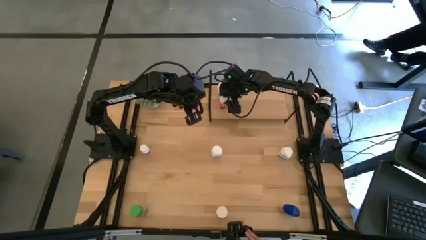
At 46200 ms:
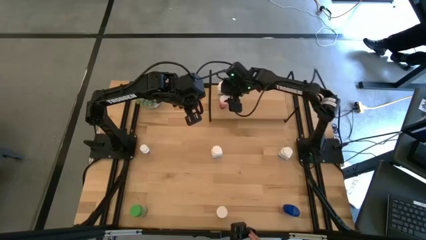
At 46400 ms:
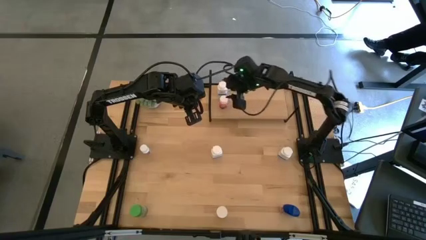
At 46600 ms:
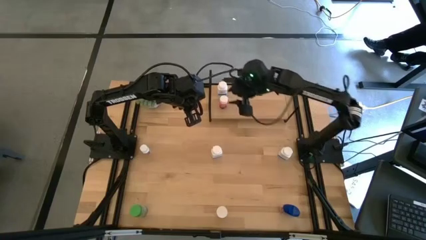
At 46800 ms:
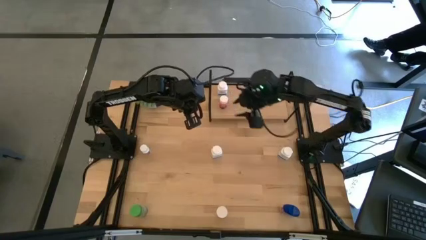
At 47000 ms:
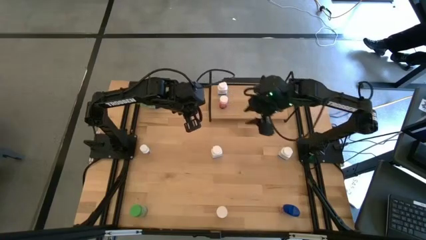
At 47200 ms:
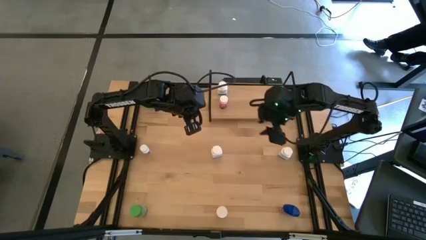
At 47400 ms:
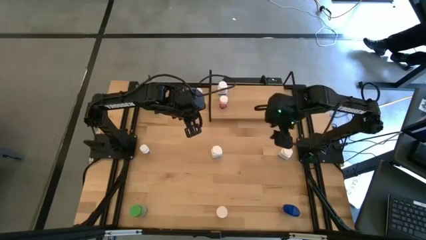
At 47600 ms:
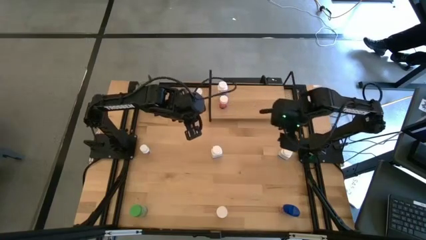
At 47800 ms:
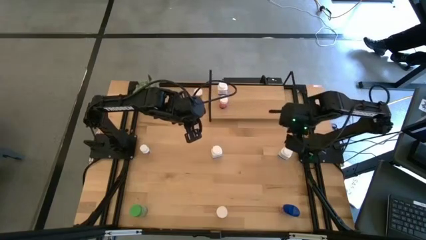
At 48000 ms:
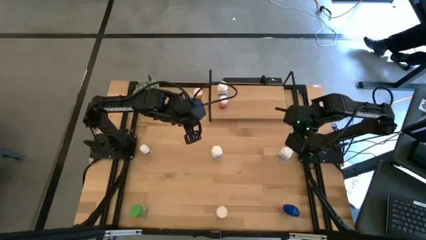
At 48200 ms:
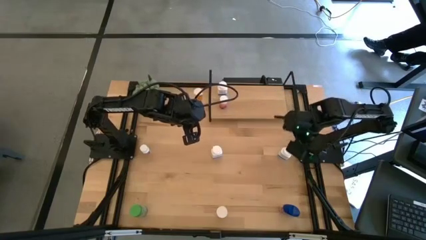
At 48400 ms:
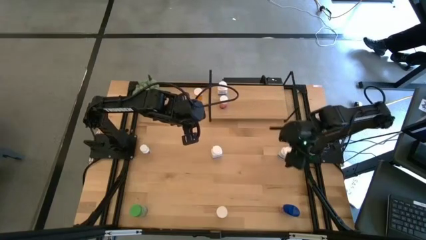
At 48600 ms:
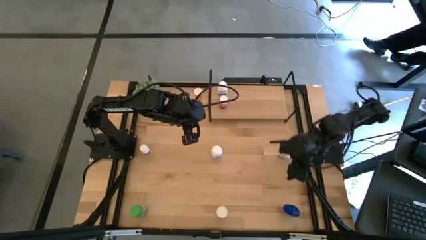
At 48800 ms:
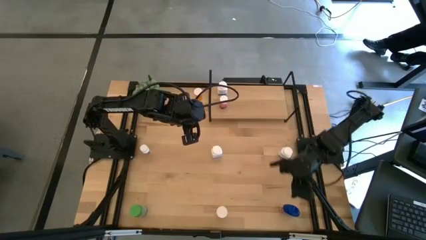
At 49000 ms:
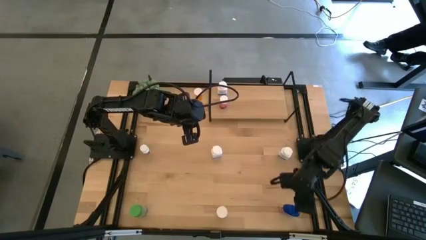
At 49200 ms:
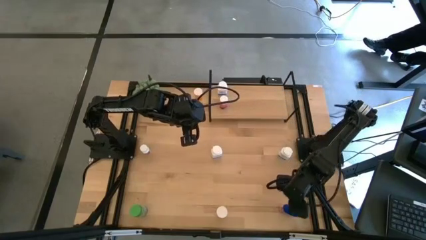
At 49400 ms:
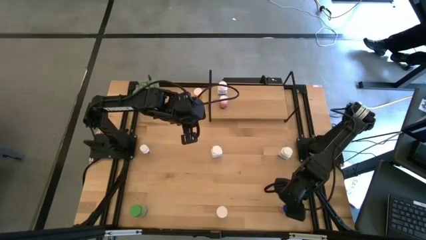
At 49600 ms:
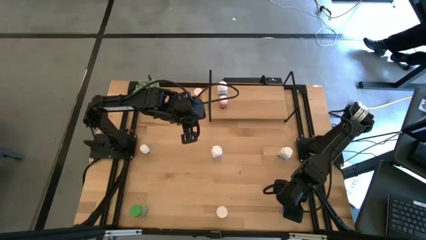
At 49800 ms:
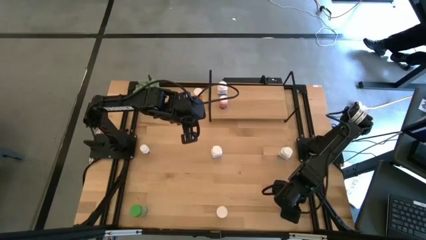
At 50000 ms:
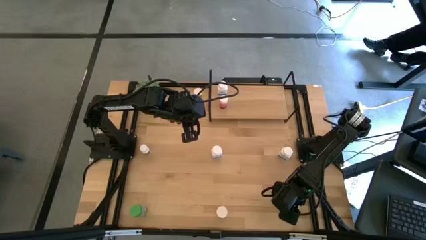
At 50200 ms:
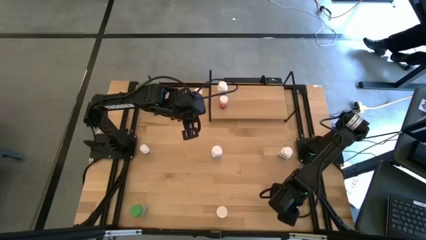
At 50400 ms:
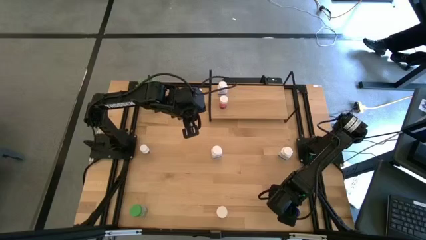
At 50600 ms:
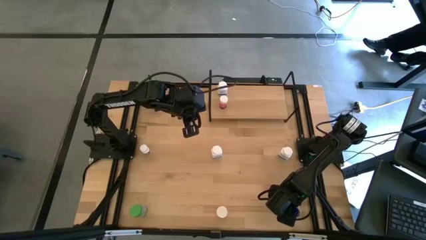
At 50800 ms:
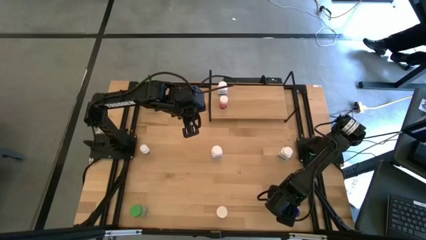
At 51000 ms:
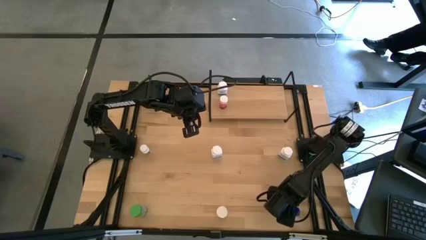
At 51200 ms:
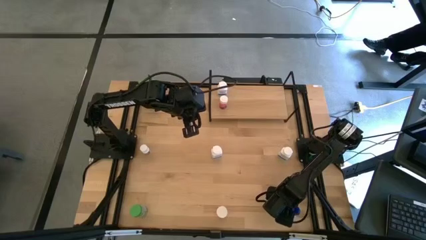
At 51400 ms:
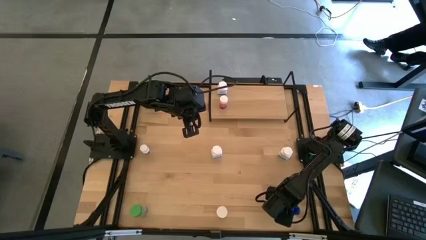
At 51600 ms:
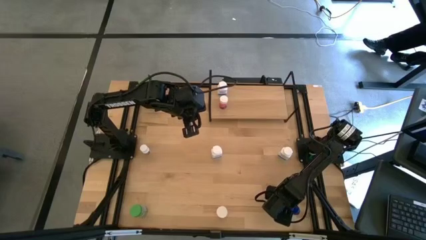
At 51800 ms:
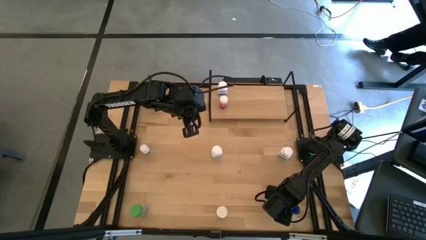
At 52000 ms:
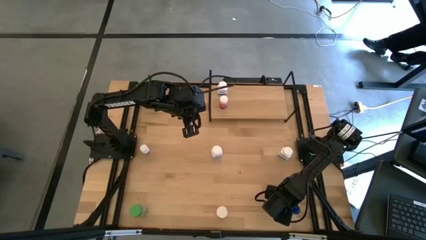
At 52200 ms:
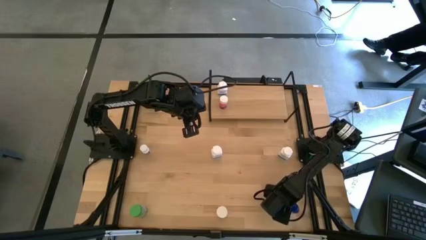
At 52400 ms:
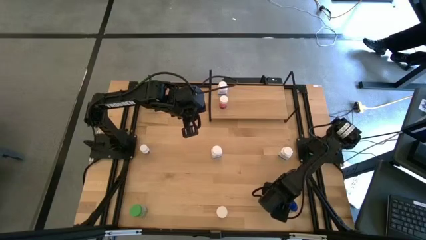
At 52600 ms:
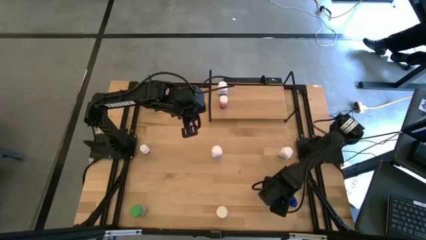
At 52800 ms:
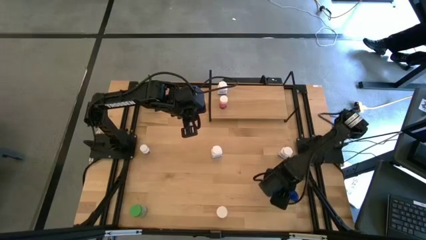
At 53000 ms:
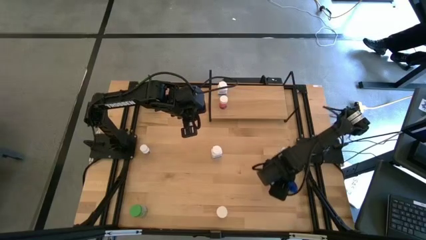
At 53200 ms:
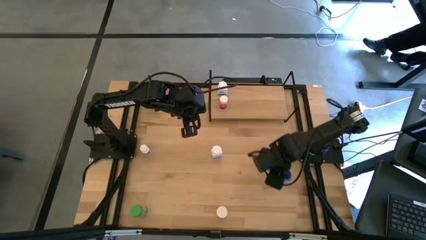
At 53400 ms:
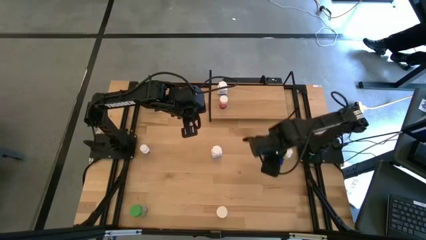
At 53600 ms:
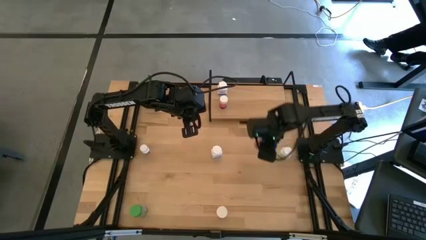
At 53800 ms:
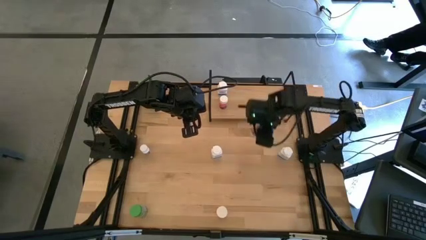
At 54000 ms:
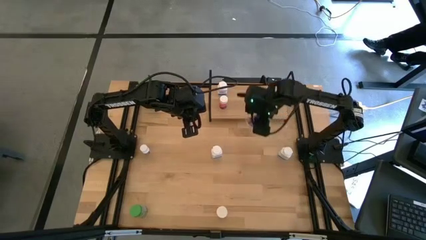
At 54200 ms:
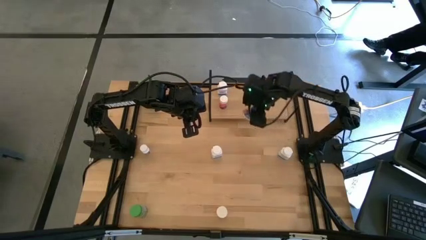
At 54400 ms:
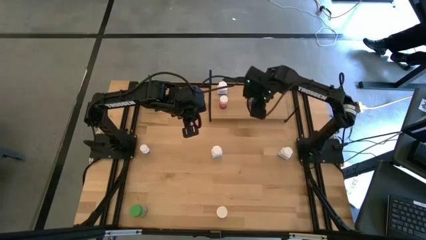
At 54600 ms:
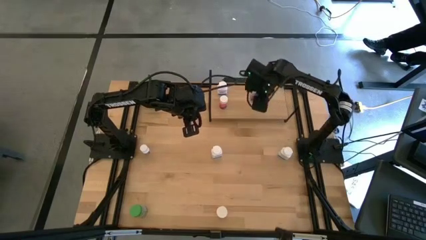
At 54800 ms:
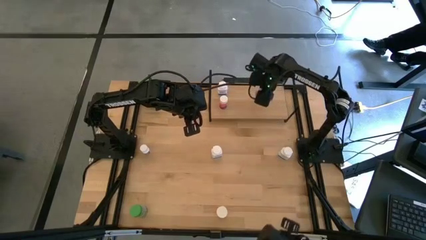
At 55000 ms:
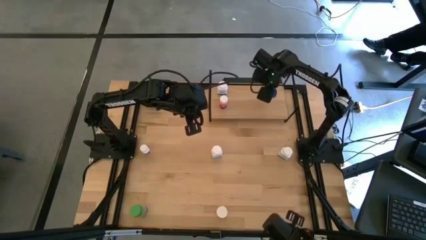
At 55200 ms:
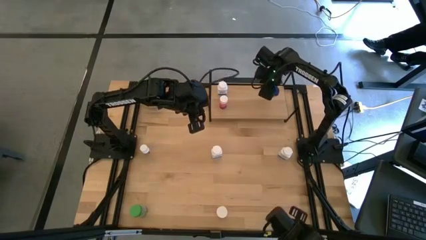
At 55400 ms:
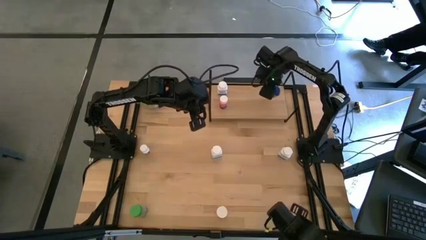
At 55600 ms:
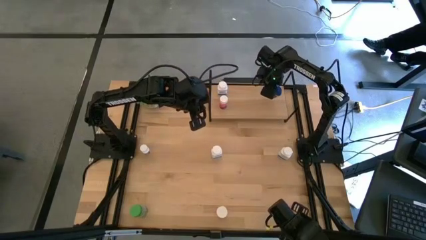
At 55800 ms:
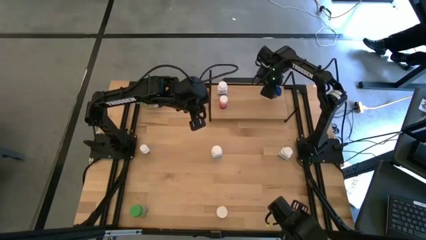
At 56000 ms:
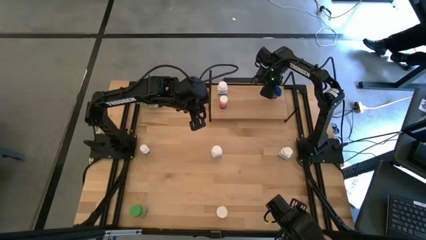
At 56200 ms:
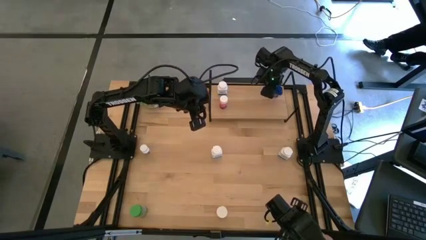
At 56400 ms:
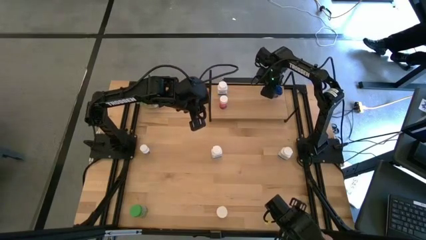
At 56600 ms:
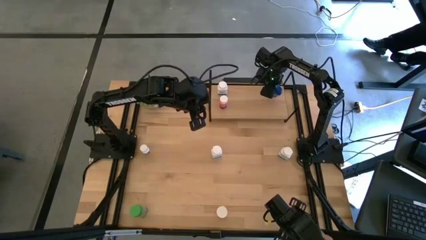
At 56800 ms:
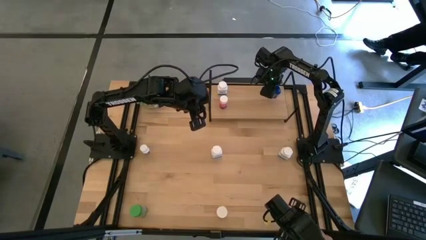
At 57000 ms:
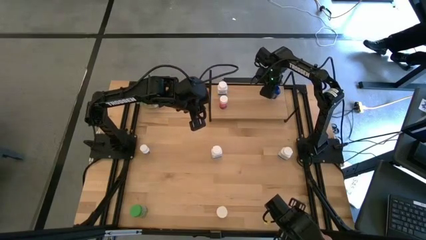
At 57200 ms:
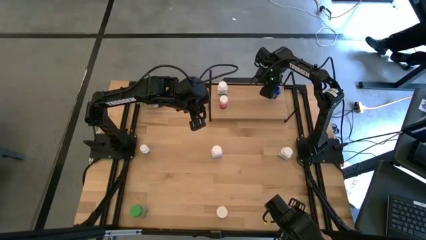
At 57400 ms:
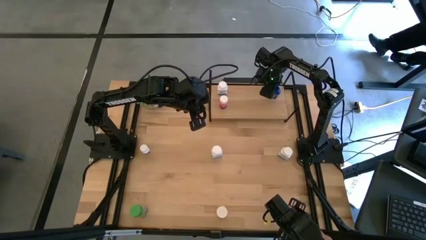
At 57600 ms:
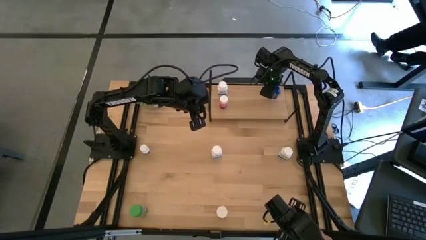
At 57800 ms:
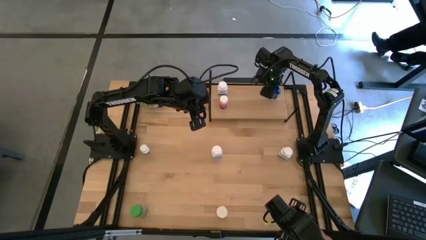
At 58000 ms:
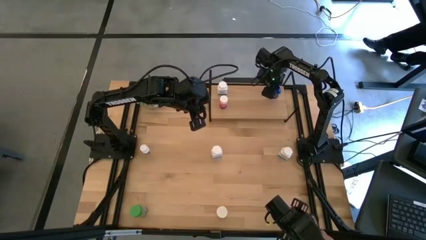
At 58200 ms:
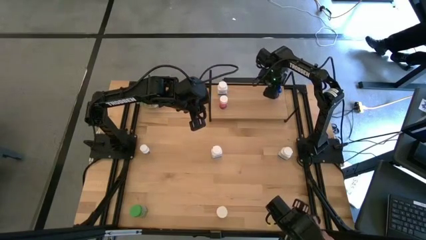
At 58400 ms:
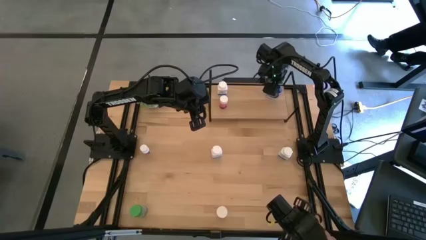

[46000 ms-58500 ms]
Task: Pick and place medicine bottles onto shelf by color
Put the blue medicine bottle on the shelf
